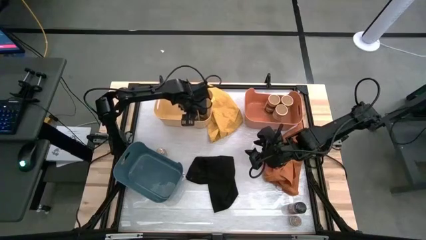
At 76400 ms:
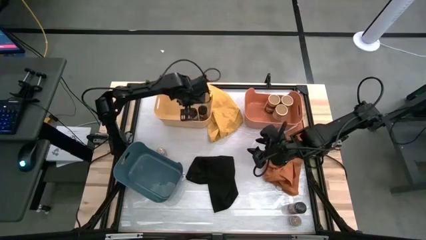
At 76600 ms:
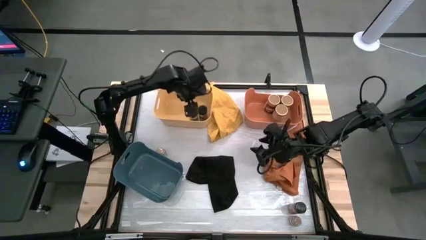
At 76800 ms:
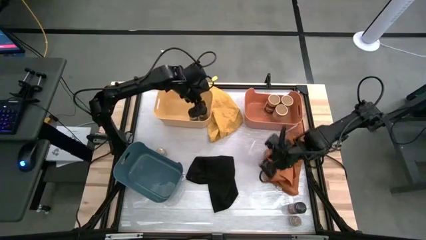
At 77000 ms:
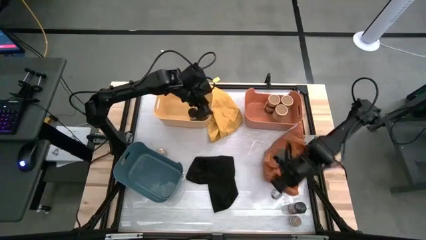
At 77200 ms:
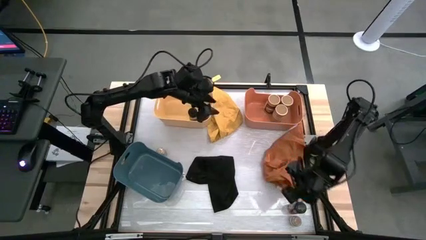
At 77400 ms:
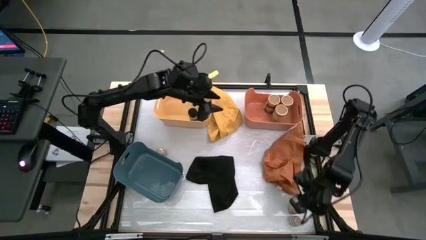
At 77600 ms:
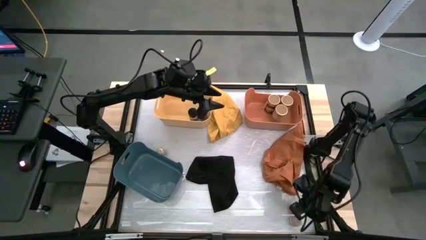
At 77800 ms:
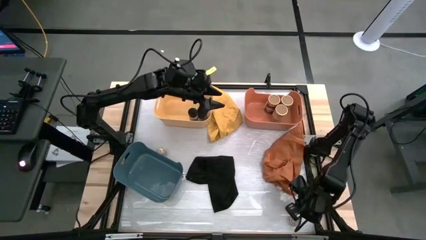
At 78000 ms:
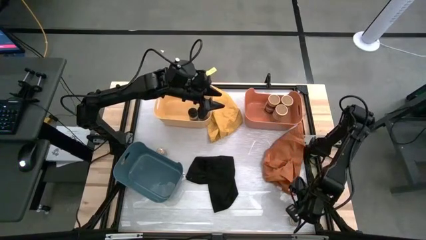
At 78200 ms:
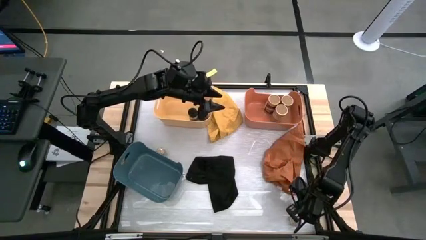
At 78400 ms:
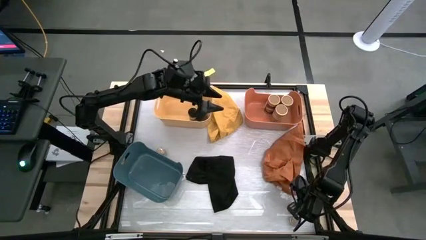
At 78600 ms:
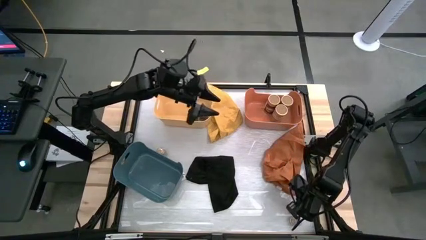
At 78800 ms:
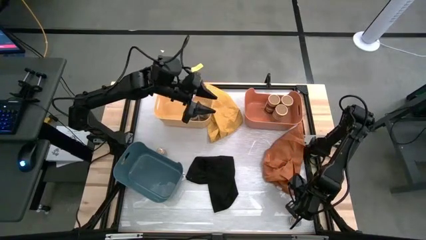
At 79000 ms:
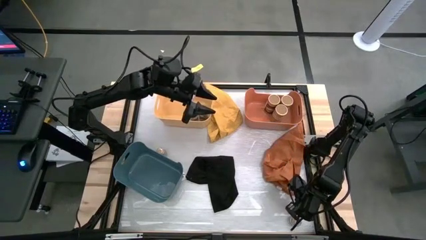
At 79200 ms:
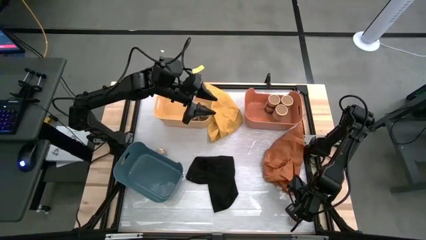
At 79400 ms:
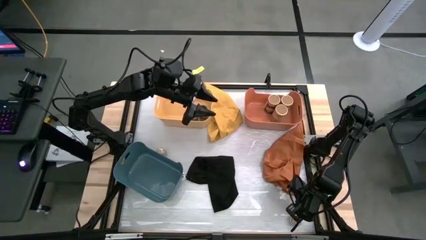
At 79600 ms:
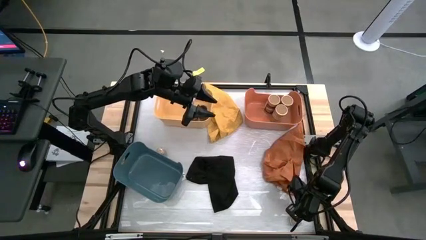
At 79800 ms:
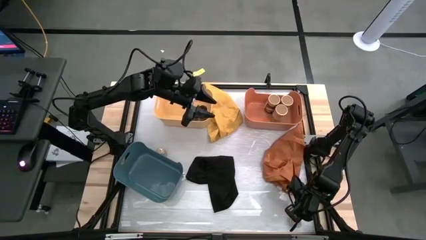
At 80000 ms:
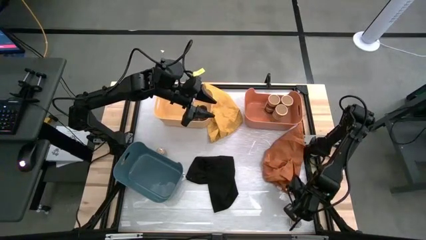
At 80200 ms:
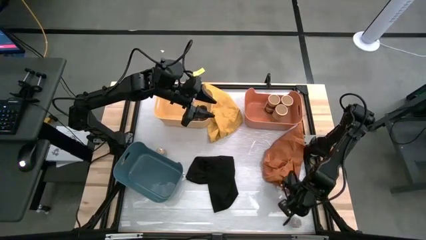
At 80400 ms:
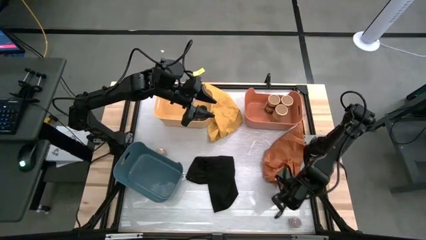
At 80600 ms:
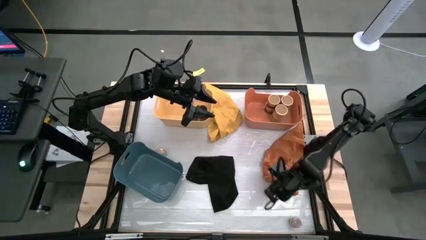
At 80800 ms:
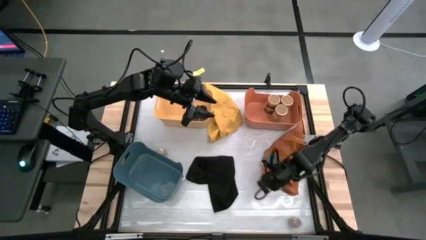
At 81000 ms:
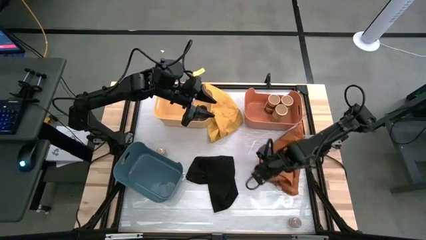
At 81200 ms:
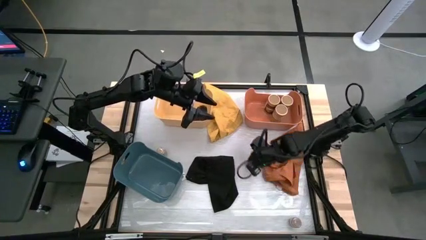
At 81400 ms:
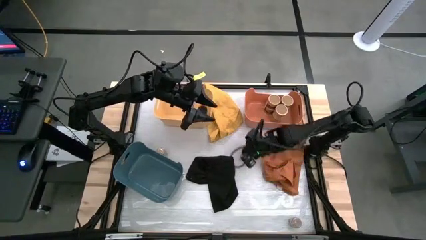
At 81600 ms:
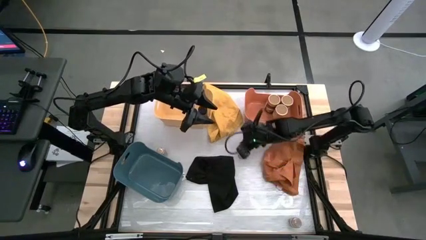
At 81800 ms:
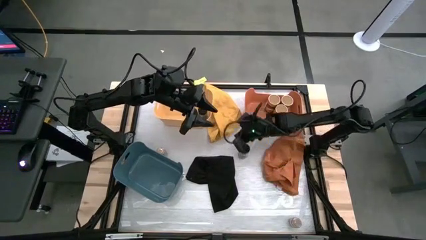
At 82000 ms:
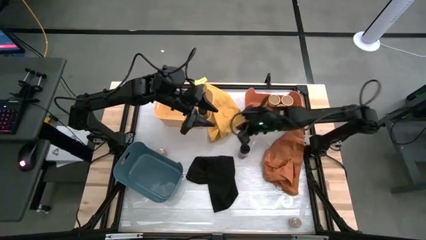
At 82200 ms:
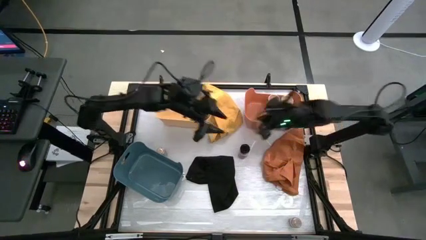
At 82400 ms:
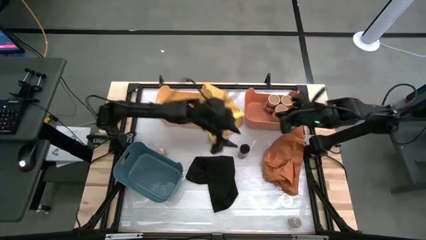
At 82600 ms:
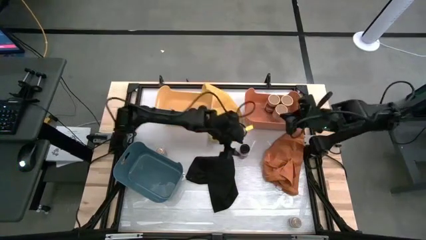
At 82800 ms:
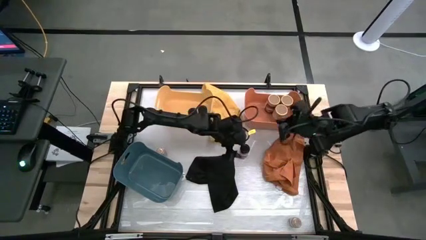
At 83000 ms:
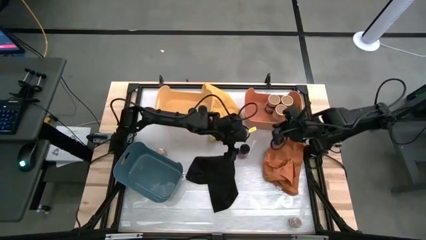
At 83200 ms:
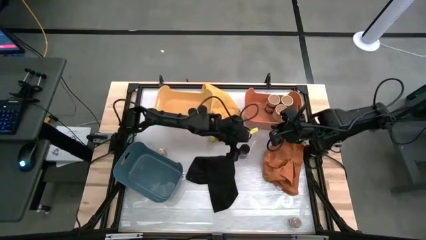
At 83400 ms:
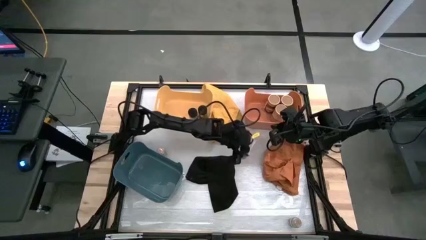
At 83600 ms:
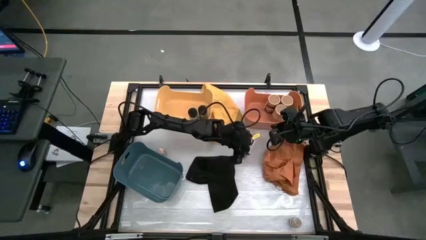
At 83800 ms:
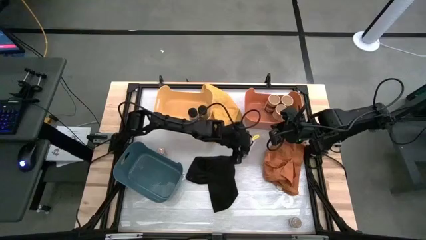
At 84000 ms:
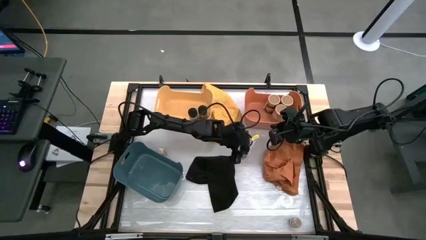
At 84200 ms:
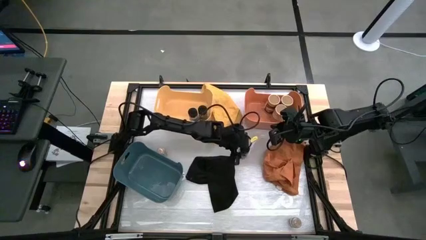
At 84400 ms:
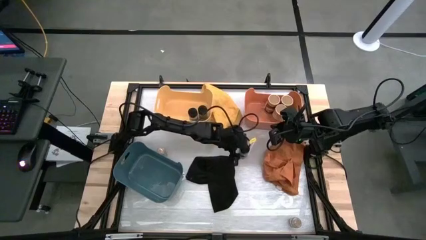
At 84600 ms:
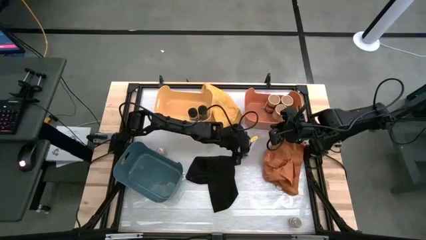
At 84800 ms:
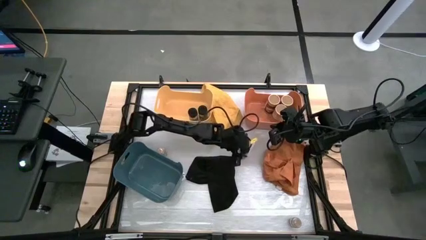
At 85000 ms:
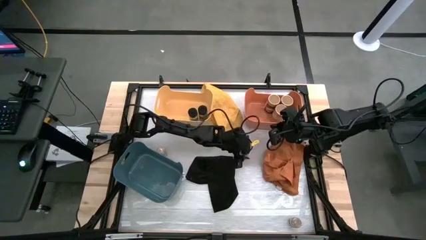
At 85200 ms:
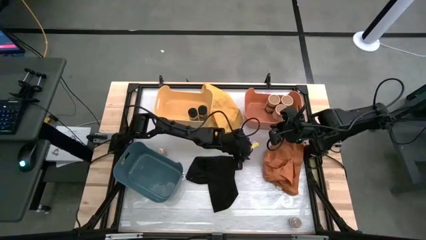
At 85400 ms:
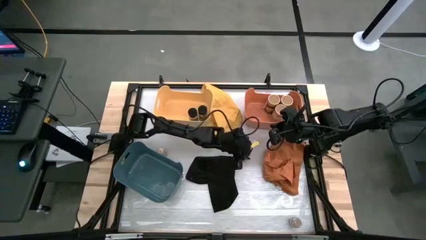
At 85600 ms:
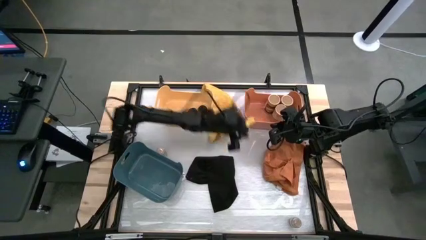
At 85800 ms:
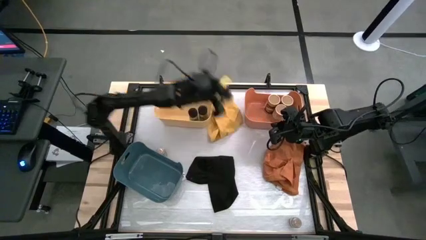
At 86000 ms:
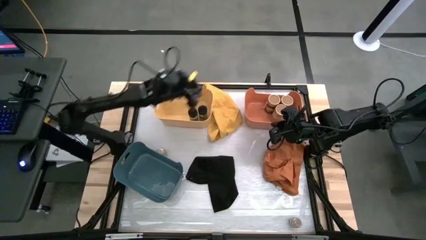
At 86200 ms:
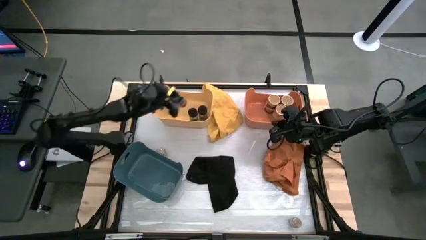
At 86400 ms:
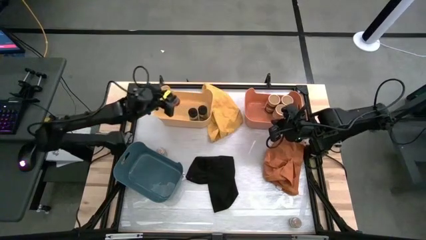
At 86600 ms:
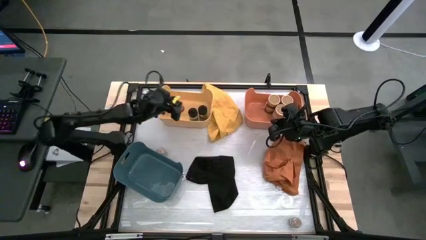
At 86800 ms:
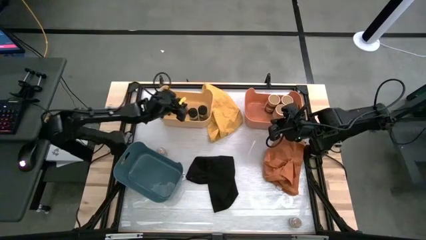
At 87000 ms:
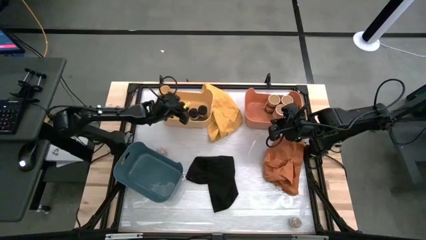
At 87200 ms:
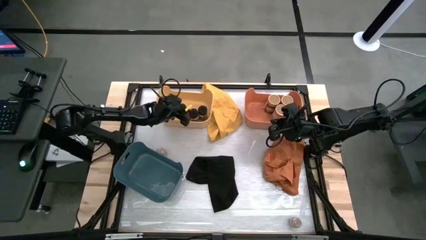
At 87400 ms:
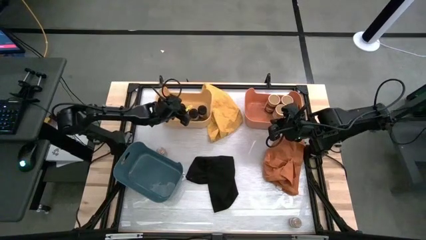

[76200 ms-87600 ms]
Task: Sort spices by type
Put the black spice bottle into the yellow bin
